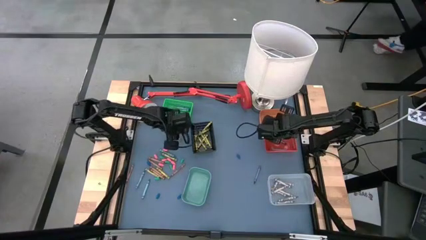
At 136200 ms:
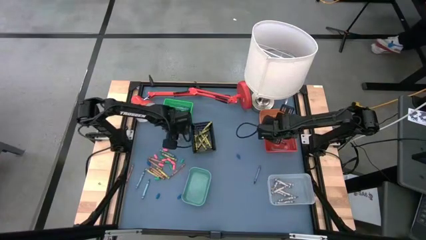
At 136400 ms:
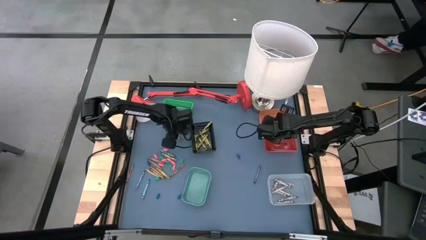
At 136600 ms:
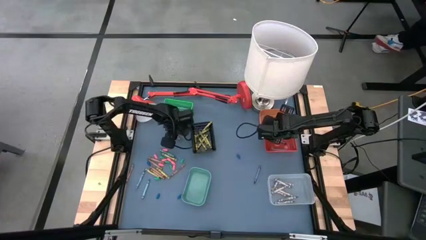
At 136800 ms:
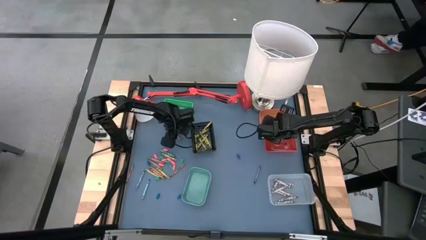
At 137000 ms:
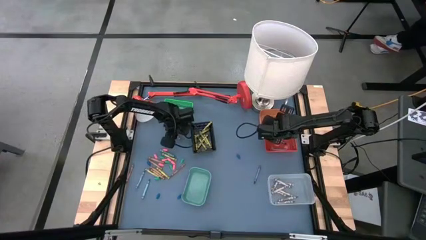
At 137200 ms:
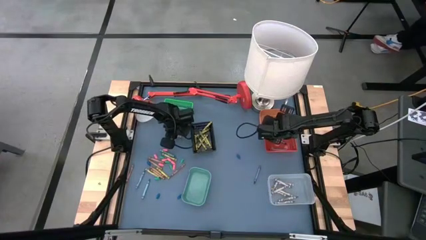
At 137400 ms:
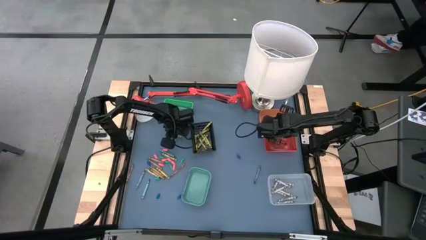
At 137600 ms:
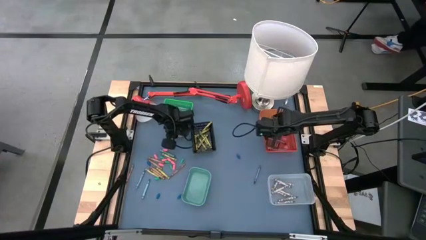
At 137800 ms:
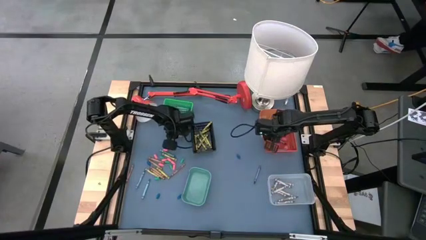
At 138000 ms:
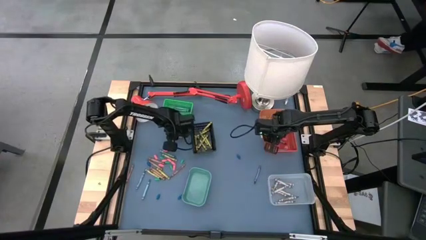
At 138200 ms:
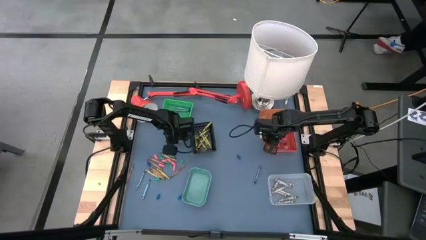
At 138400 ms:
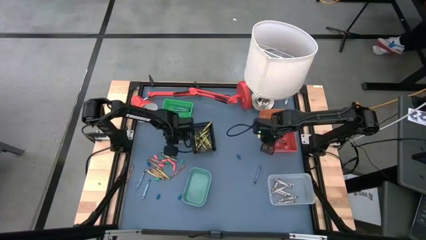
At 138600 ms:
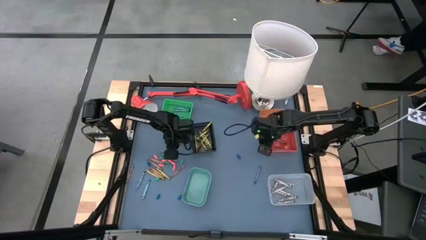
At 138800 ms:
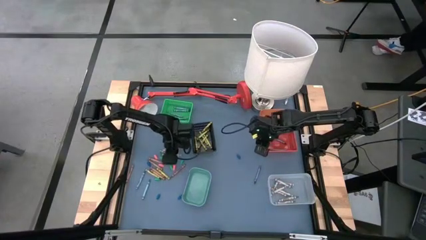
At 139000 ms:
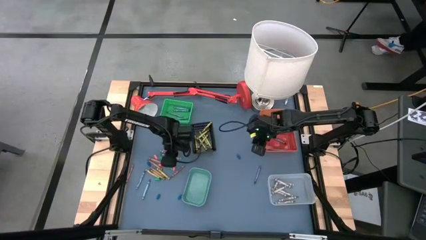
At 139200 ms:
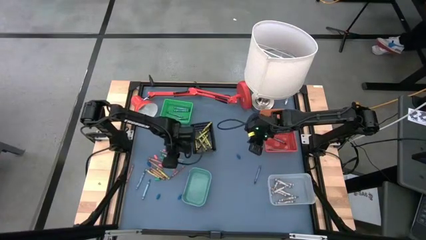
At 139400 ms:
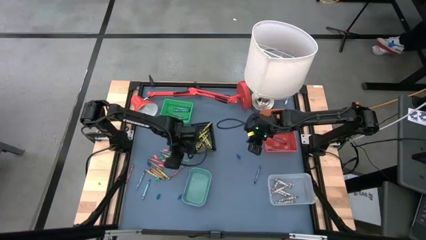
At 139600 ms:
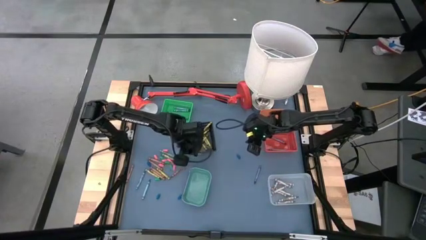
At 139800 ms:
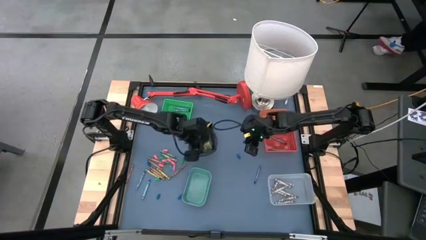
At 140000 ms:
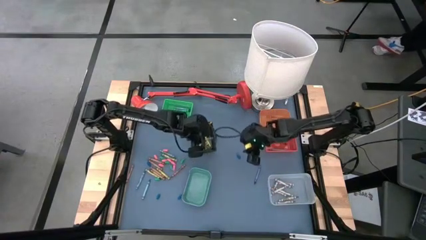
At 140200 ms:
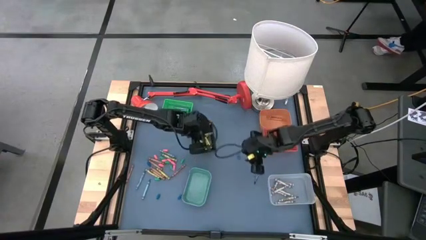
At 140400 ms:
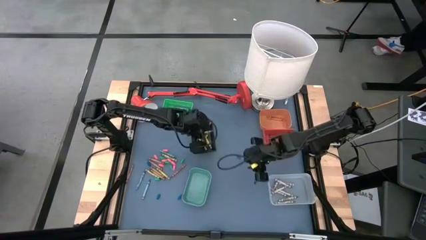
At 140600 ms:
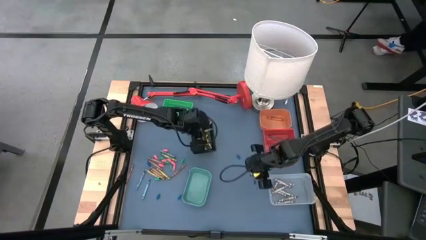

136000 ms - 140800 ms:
Task: Sort crayons
Put the green crayon into the black bin

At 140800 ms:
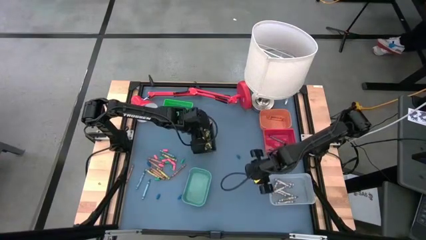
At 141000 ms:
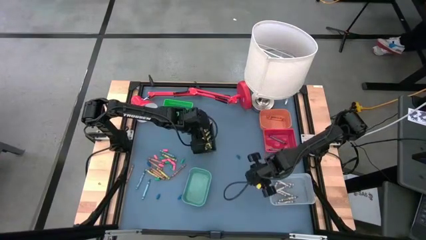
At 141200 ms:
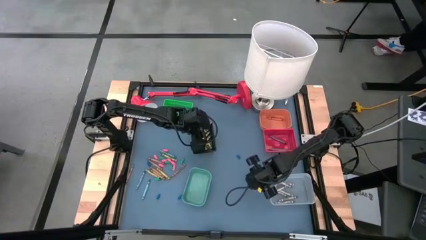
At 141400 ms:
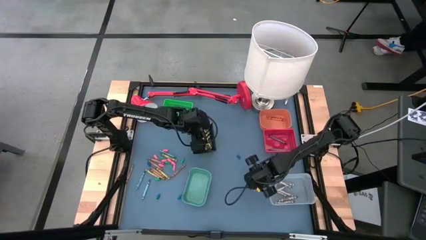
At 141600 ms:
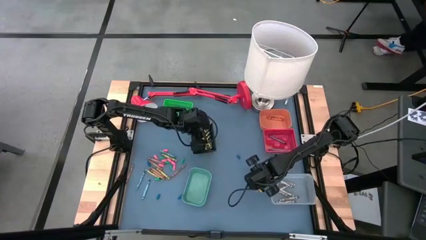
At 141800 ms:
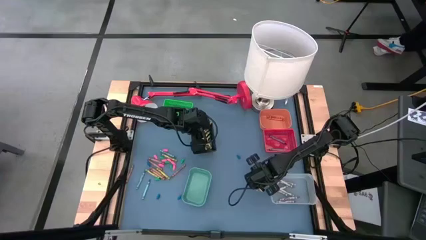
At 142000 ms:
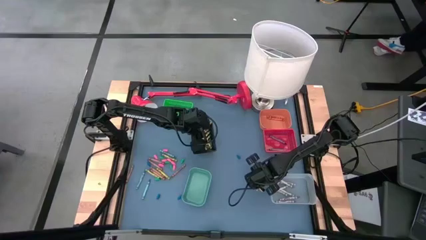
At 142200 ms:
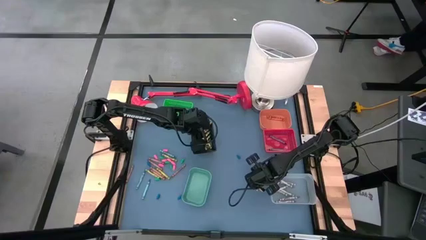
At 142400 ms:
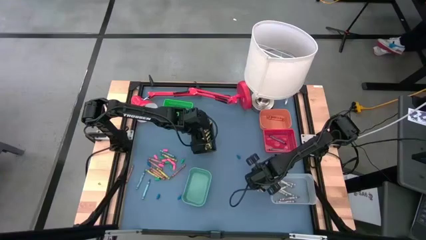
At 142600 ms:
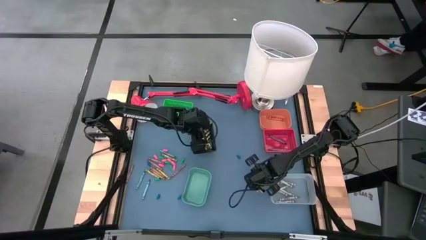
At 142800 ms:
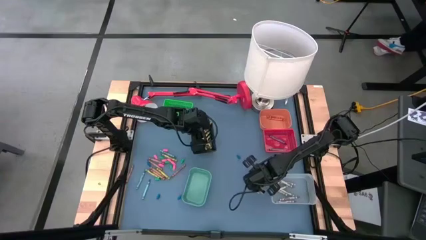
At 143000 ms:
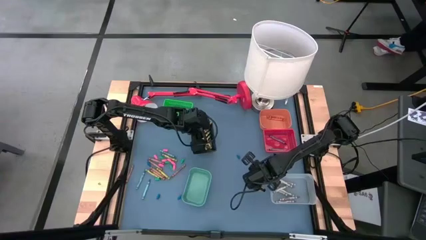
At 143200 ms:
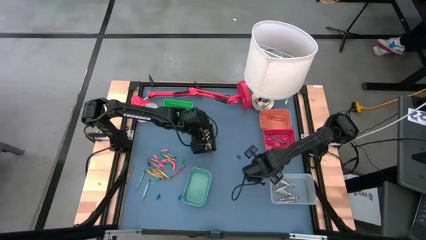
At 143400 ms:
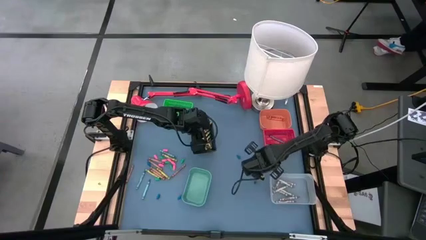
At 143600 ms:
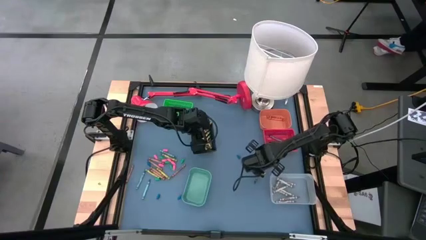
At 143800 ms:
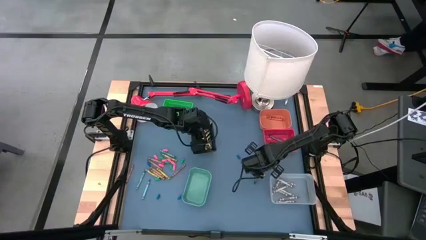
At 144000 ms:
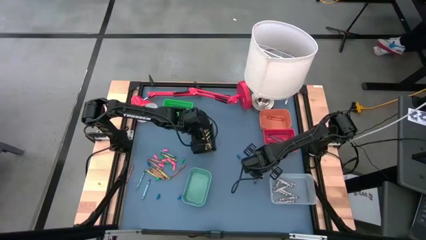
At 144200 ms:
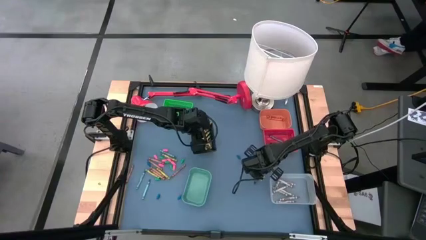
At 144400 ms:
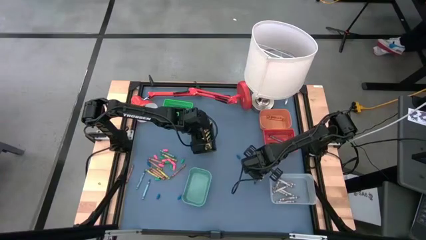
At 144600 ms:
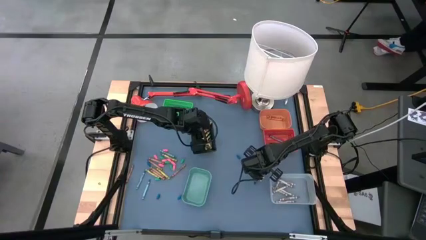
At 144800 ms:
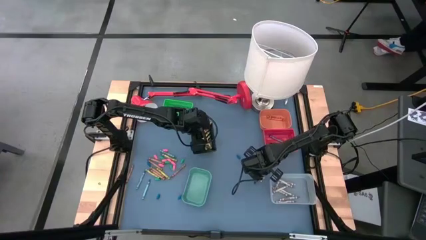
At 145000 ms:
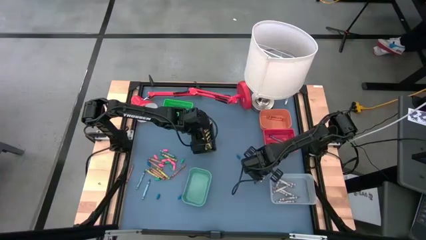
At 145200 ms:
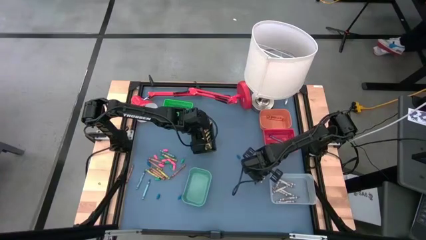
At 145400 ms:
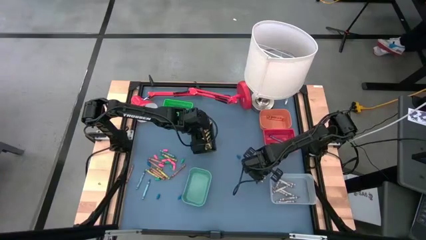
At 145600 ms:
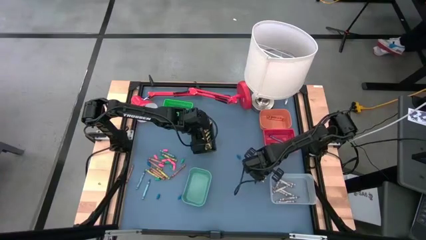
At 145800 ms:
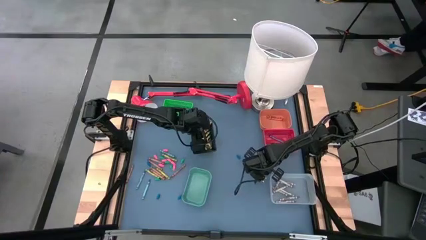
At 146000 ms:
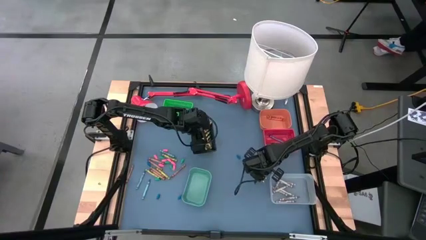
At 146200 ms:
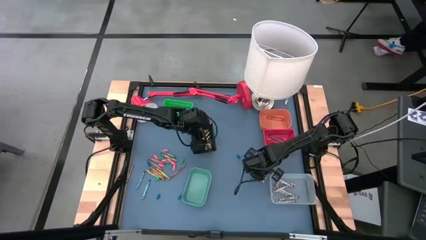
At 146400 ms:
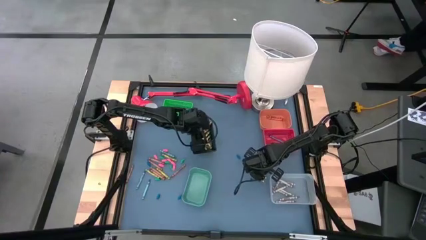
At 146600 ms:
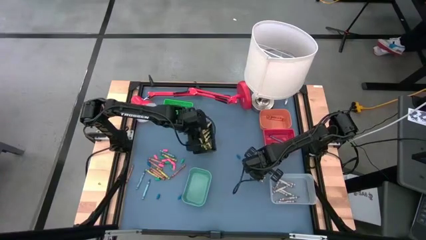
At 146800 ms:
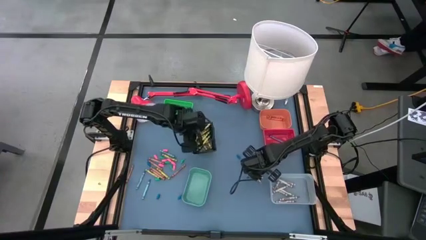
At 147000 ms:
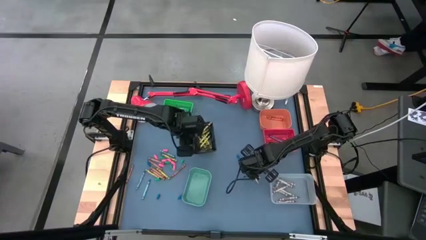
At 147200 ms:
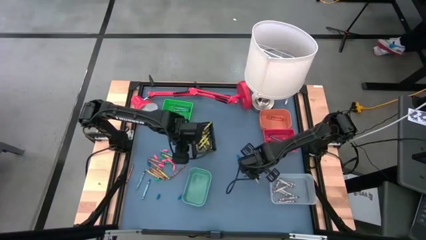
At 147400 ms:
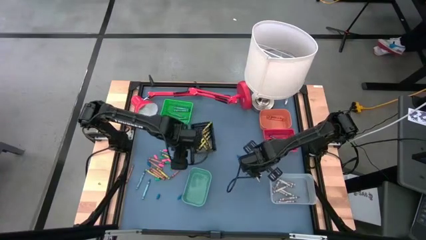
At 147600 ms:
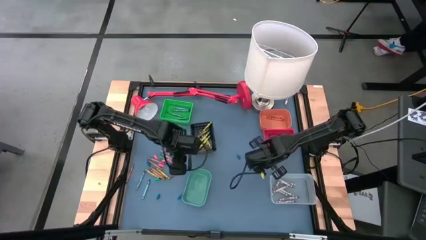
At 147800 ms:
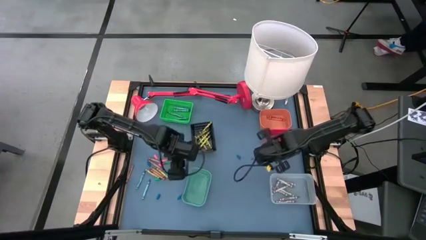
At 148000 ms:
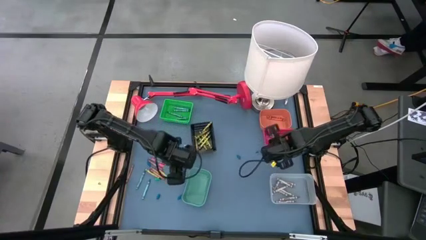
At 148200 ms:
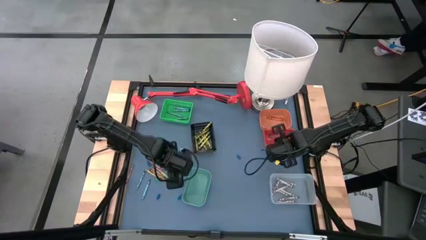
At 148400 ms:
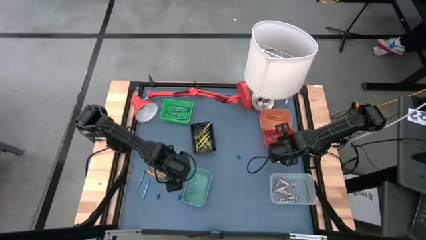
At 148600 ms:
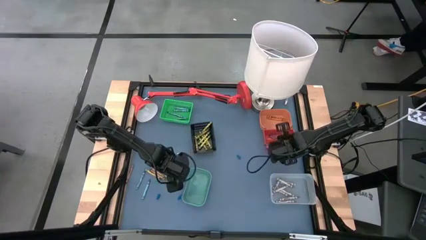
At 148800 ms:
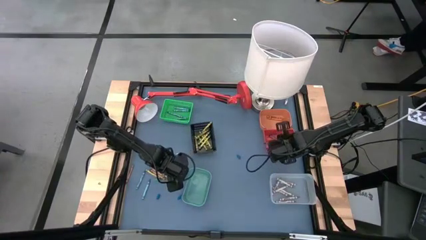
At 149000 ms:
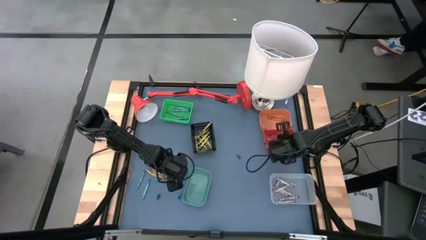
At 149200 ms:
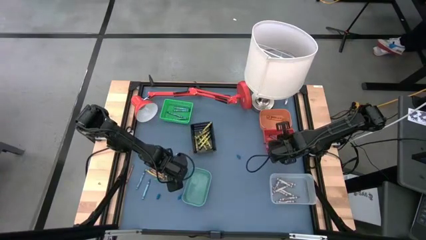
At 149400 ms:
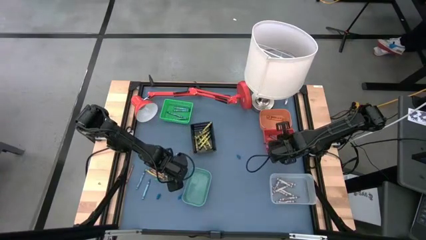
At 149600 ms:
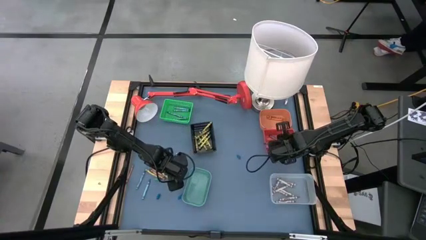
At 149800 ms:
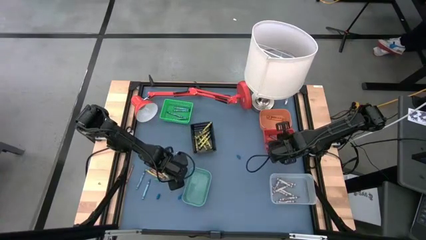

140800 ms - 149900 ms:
Put the dark blue crayon into the red bin

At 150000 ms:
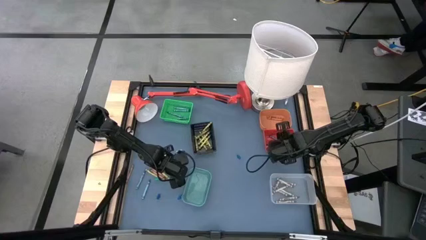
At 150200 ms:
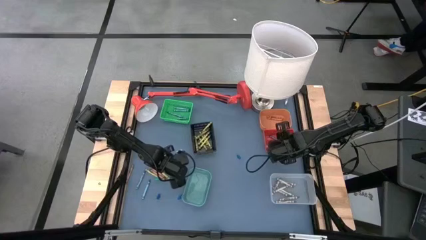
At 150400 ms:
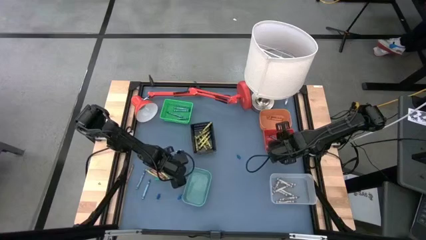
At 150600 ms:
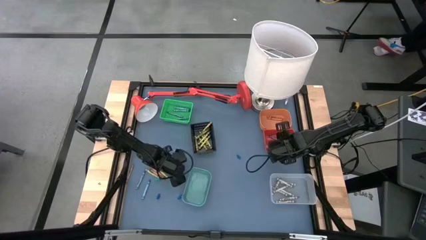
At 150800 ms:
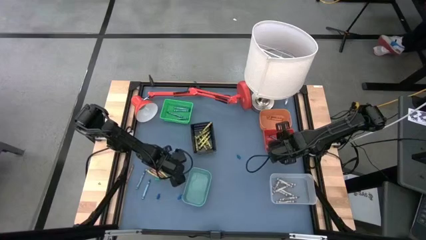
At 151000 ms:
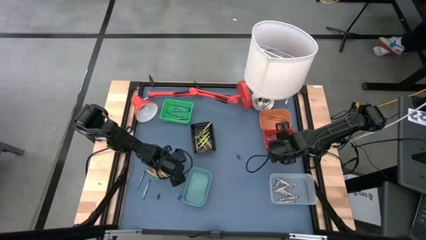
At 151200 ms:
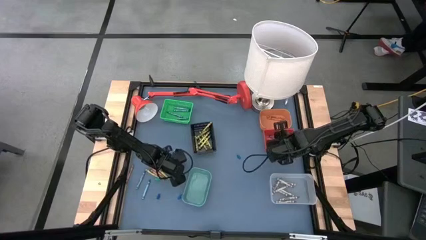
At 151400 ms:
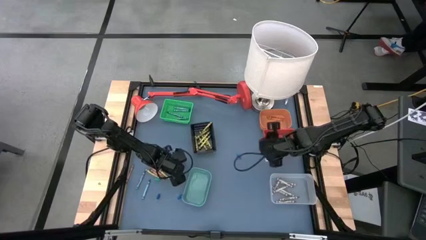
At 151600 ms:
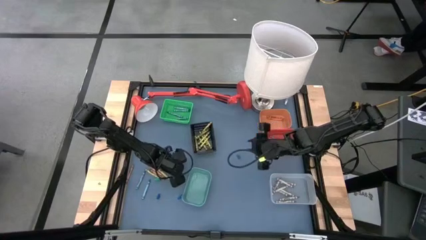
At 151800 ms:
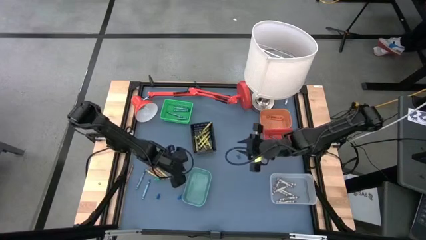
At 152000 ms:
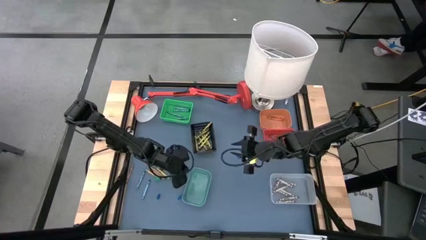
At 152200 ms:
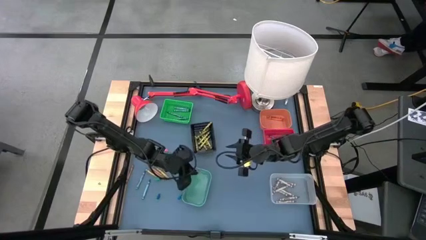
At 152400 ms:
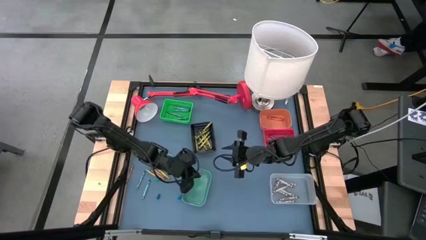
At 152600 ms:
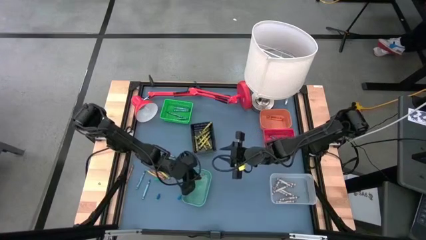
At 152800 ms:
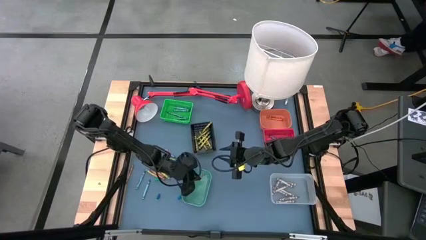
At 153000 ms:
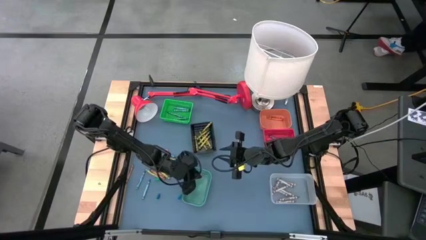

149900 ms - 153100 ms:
Put the brown crayon into the light green bin
